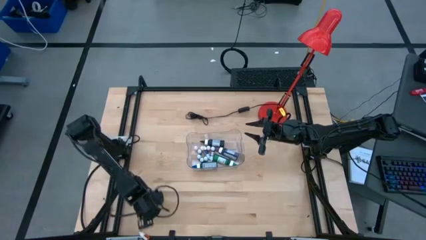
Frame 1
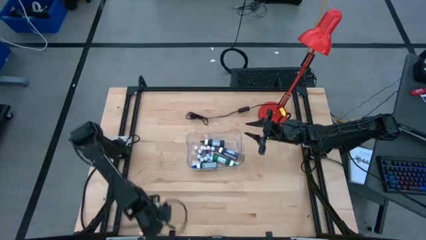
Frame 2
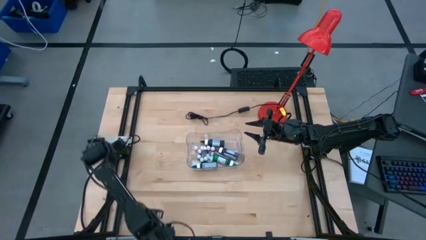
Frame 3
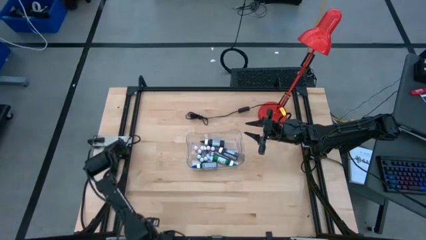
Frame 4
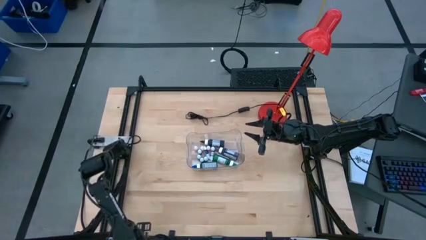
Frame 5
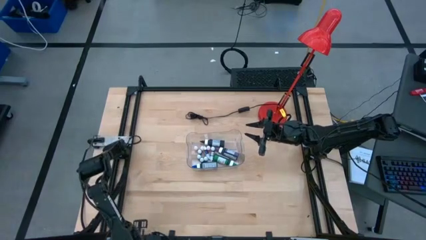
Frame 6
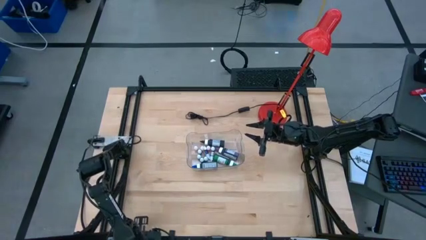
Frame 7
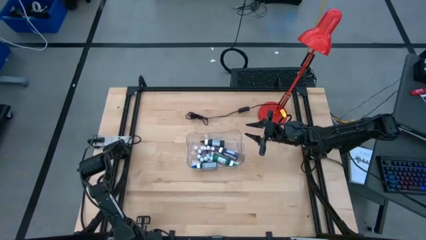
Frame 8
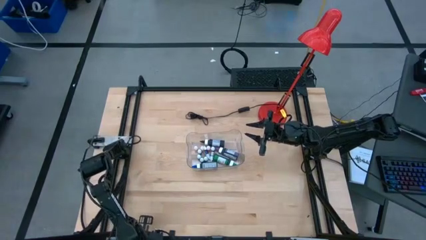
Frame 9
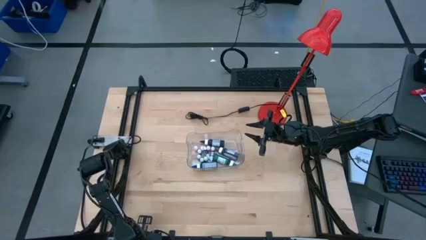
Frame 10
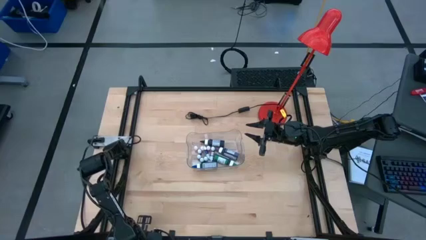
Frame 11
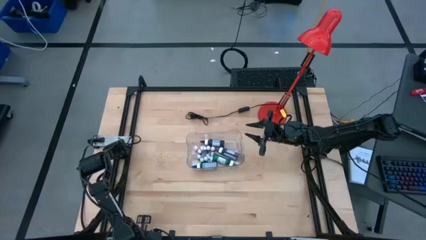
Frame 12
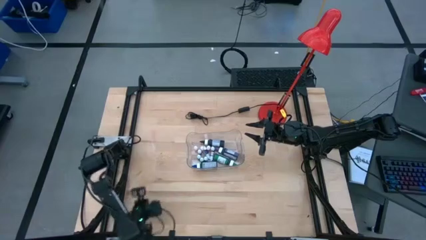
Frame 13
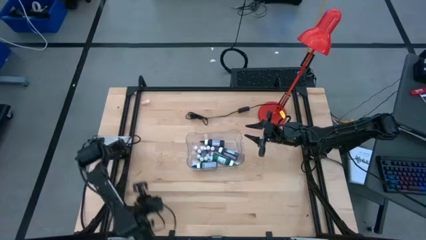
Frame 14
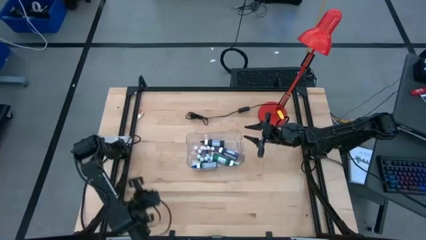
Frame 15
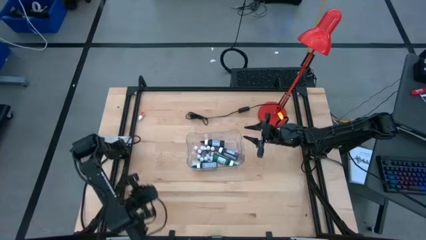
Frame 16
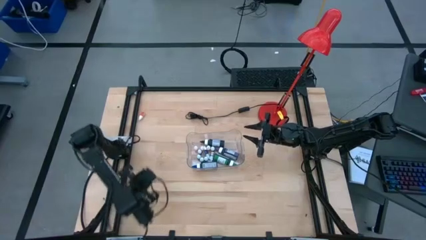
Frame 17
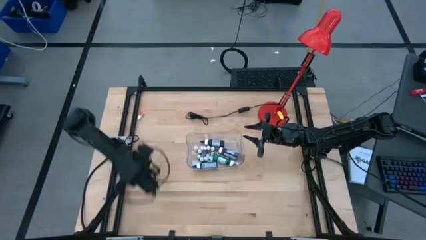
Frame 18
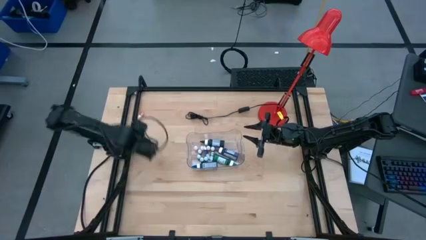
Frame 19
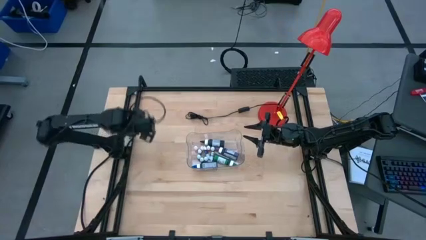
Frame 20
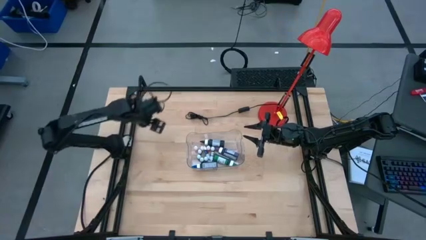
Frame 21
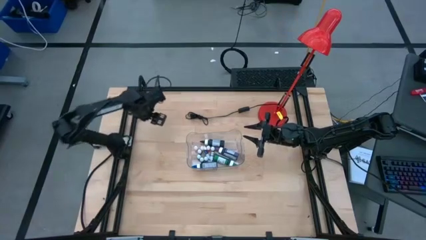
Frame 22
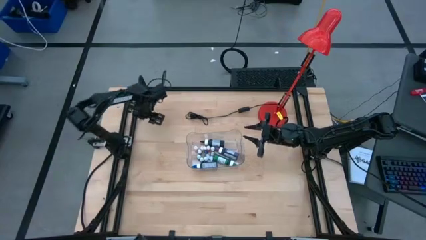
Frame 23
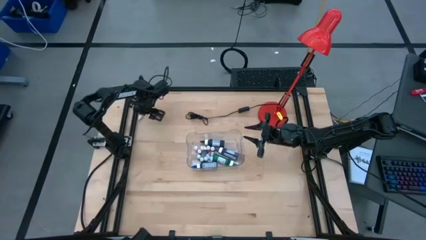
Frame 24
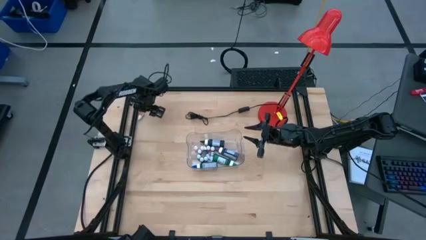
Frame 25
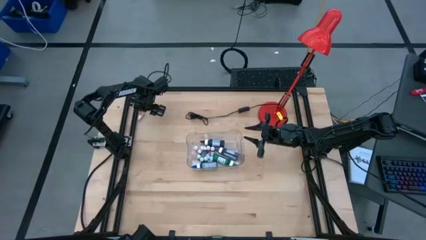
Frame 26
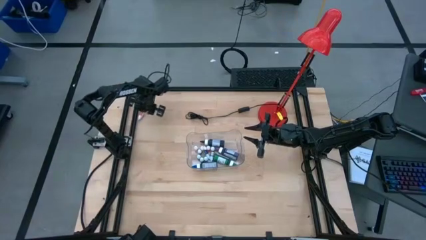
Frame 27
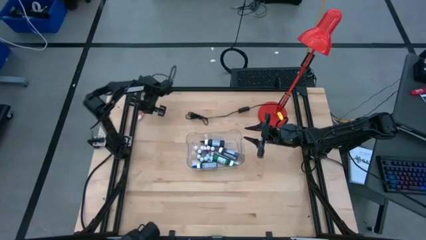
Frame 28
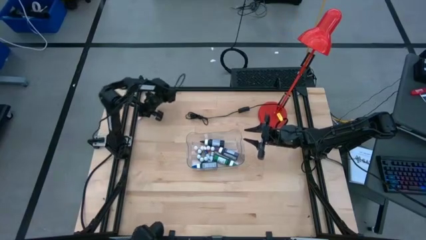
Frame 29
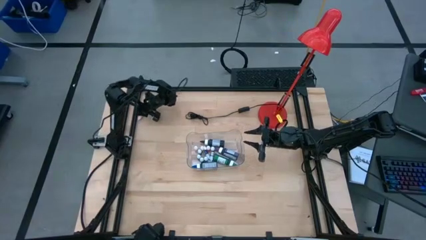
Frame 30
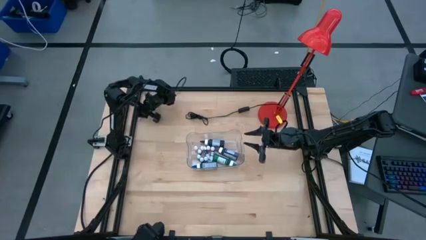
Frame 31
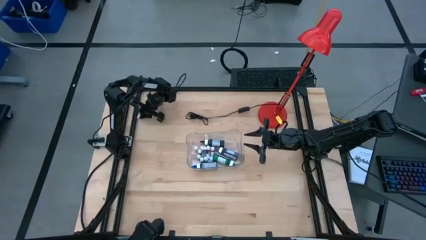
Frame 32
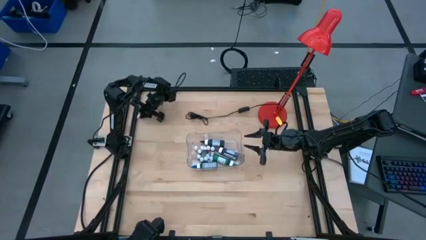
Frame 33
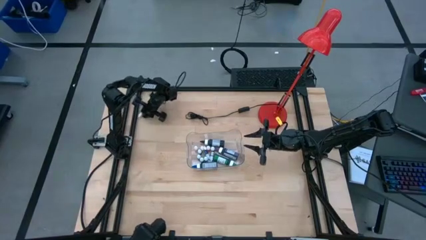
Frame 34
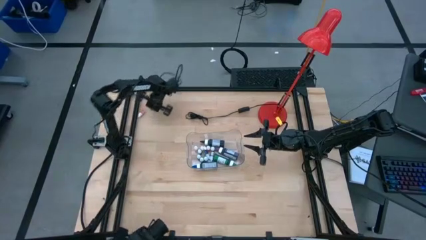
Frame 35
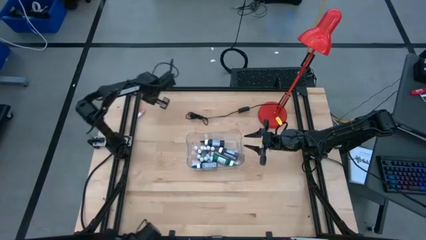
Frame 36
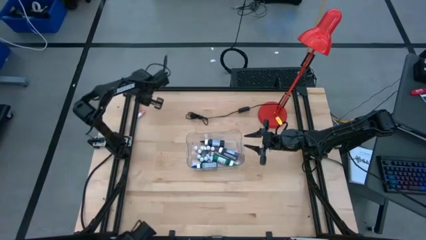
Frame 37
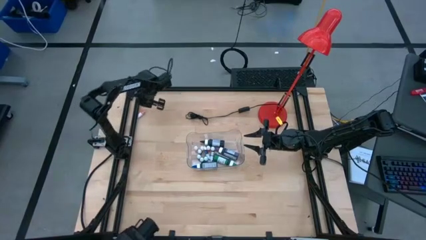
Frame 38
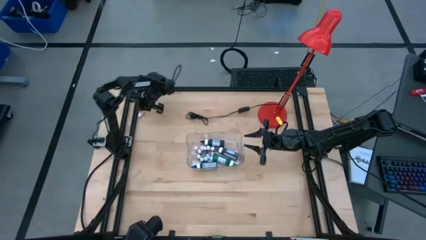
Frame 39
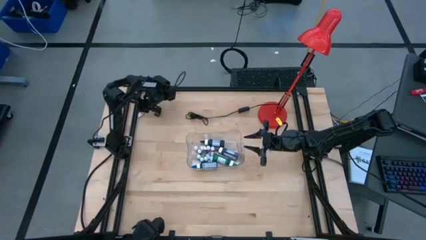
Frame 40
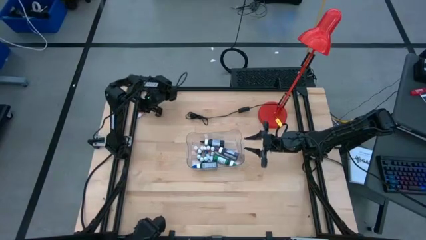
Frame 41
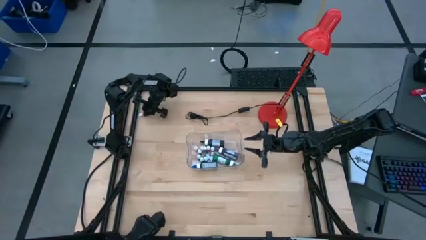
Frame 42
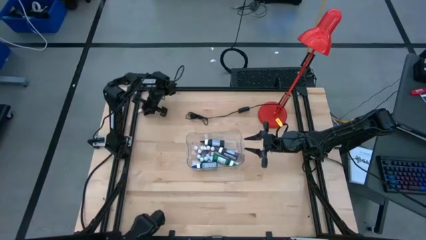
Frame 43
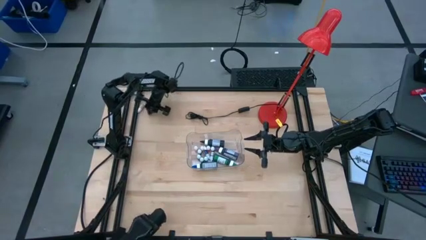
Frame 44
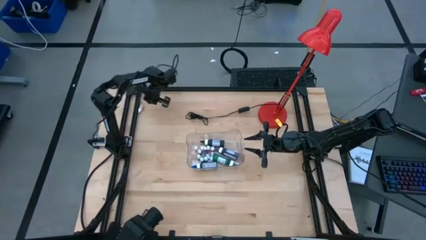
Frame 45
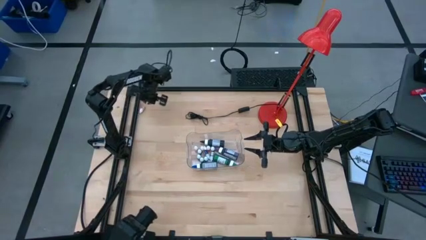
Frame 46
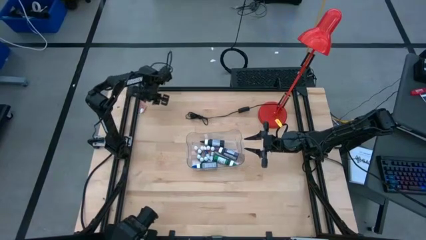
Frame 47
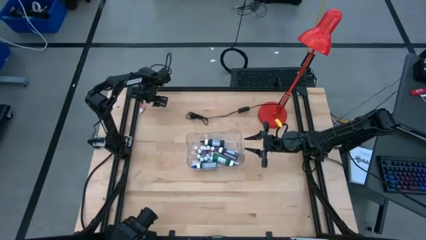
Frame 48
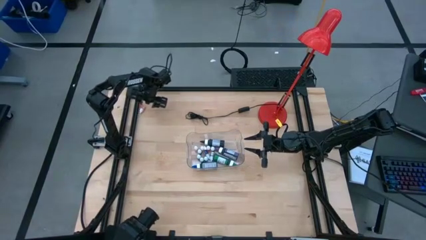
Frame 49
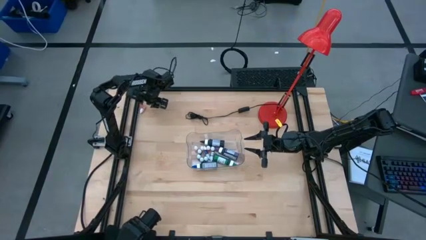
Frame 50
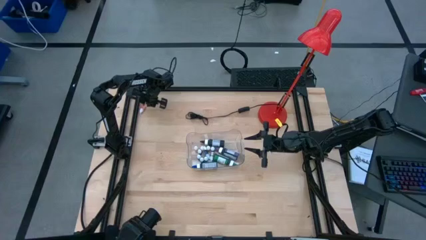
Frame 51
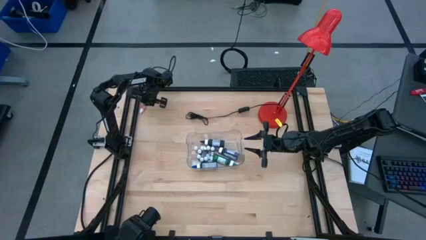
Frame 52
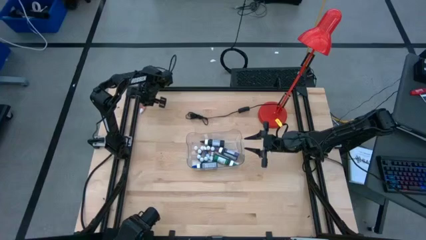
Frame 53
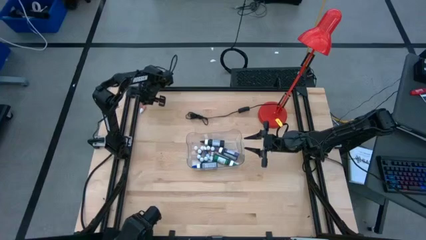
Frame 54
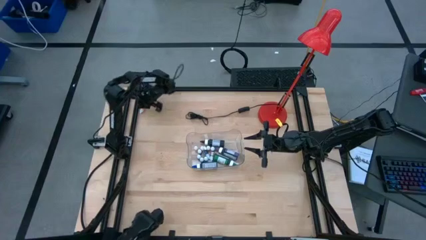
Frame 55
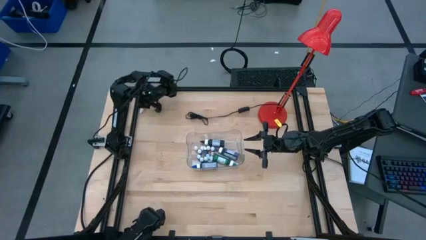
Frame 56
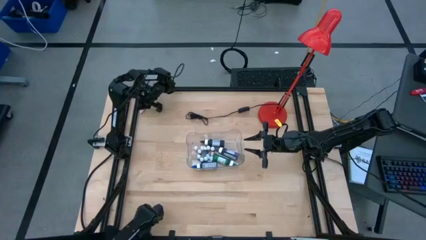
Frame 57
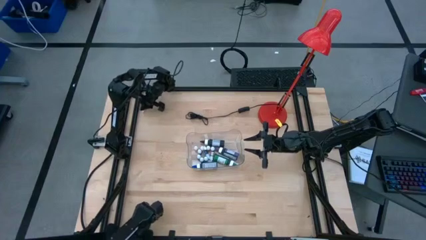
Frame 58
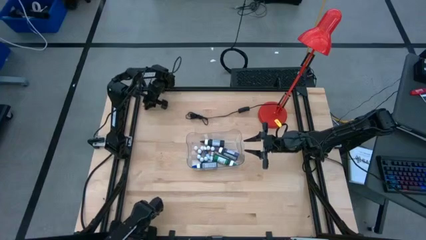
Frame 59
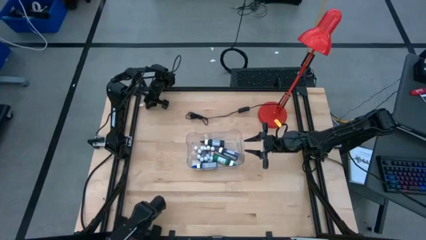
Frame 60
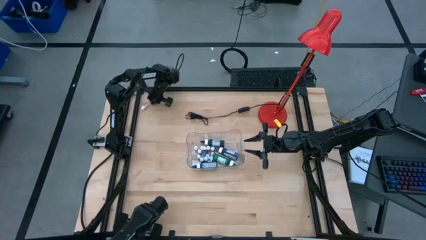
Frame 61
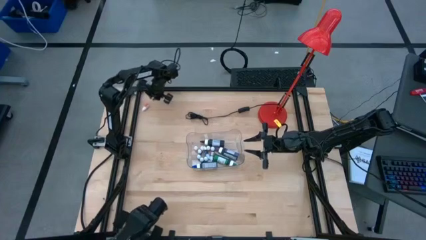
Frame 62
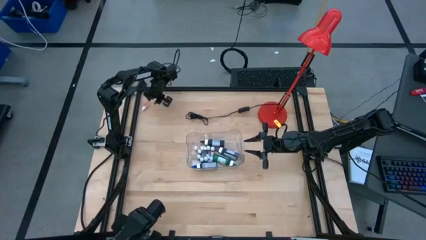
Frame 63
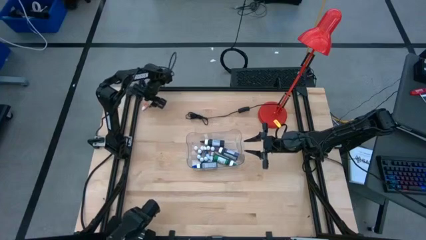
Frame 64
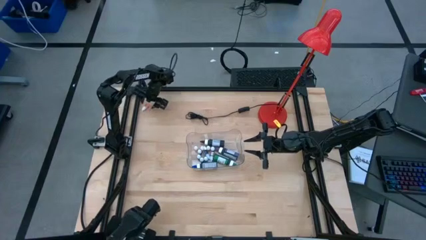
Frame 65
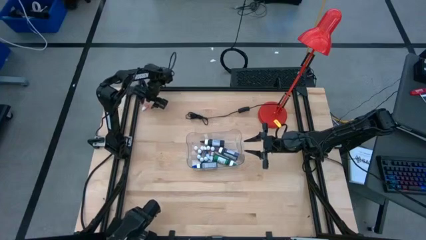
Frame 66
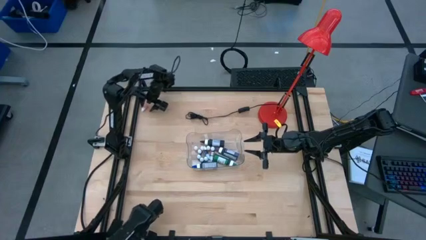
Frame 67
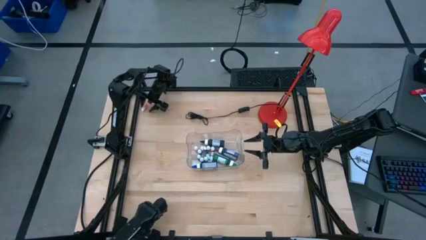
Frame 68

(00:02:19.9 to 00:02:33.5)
Task: Pick & Place food coloring
Put the small orange food coloring bottle into the transparent bin

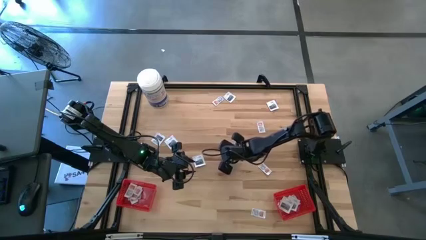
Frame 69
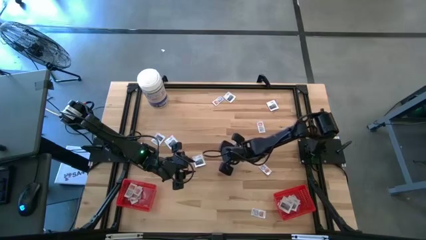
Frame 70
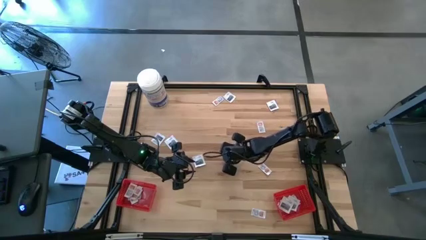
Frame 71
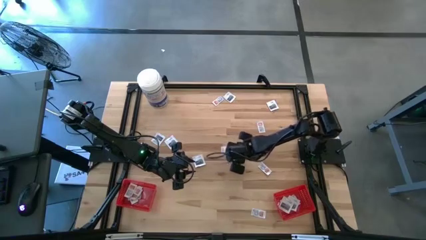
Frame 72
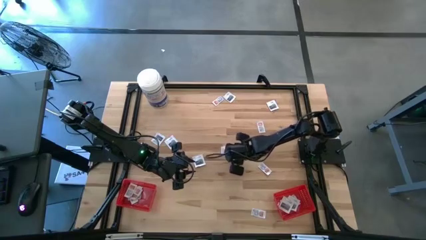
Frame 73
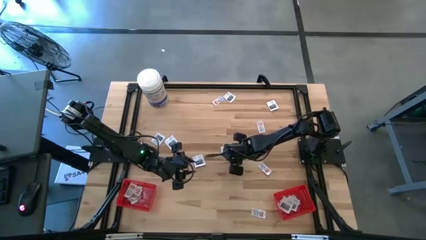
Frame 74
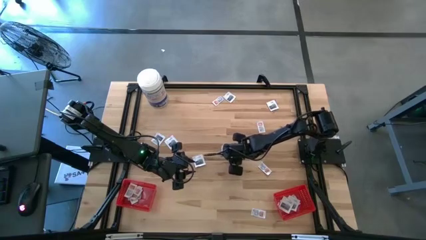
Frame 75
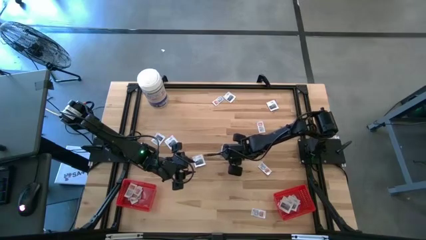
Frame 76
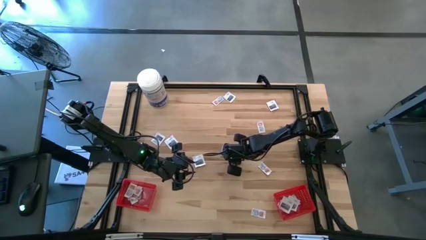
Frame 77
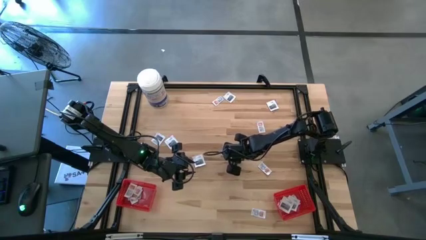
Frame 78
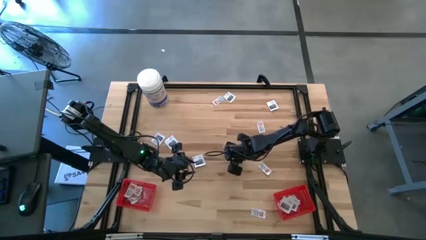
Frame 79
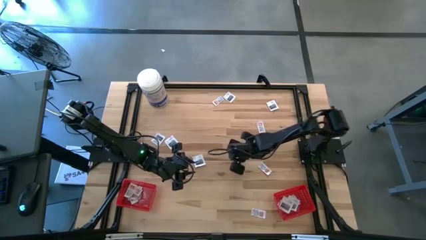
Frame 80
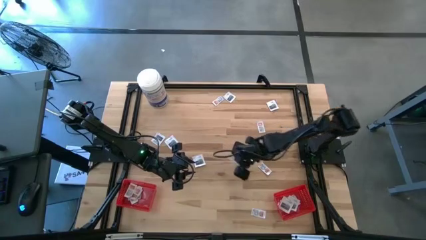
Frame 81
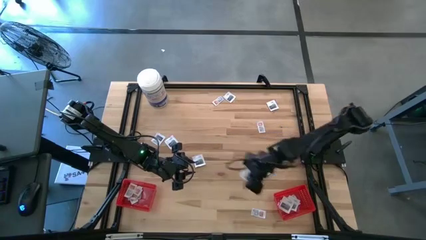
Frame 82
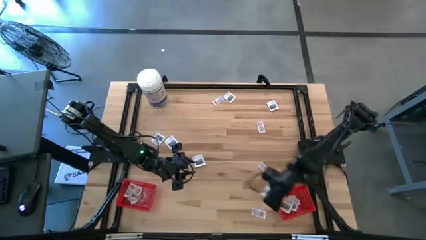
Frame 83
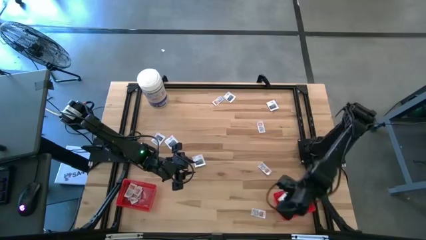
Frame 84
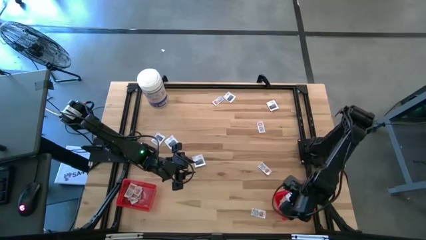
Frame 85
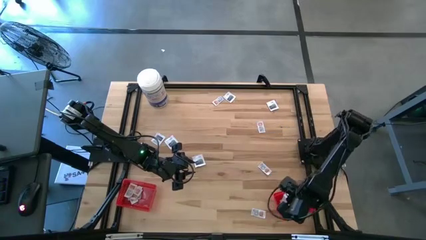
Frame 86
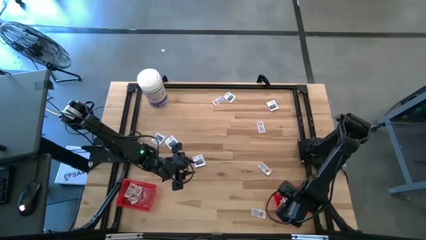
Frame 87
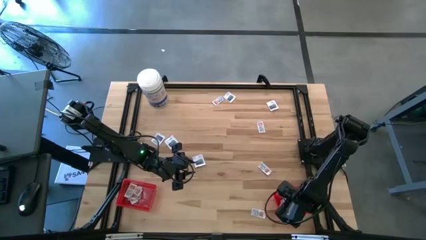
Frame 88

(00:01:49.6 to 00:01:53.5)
Task: Pick & Place First Aid Supplies
Put the towelette pack into the right red bin
